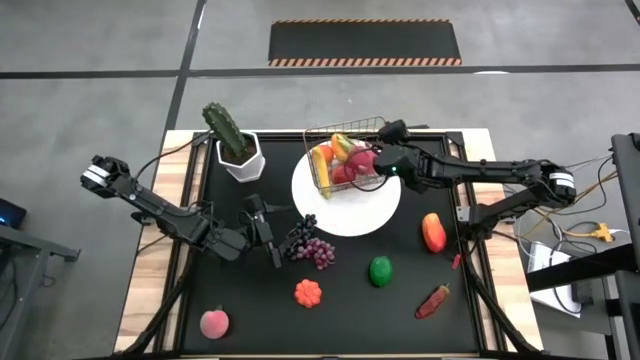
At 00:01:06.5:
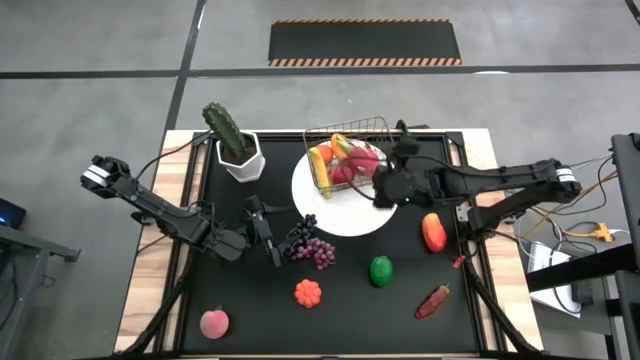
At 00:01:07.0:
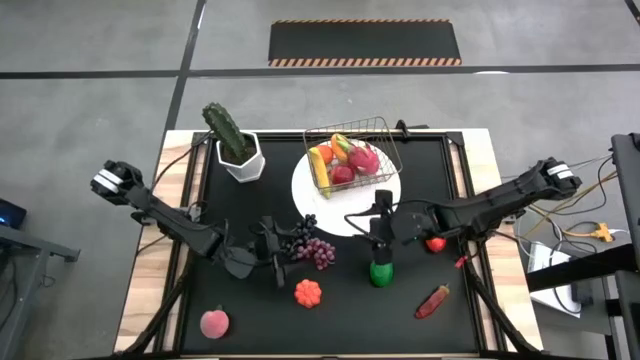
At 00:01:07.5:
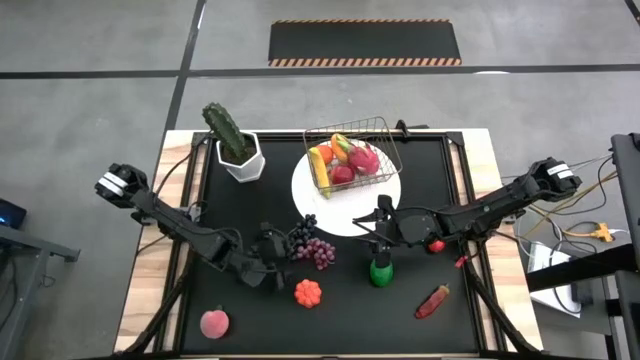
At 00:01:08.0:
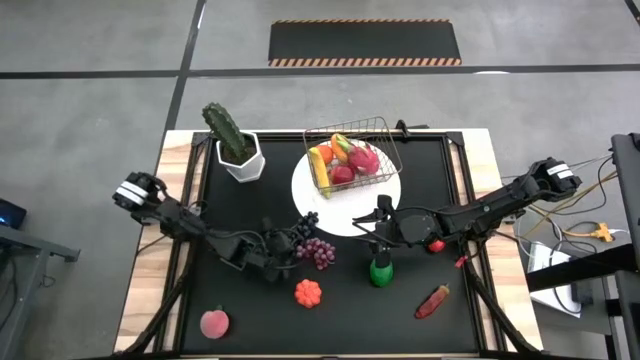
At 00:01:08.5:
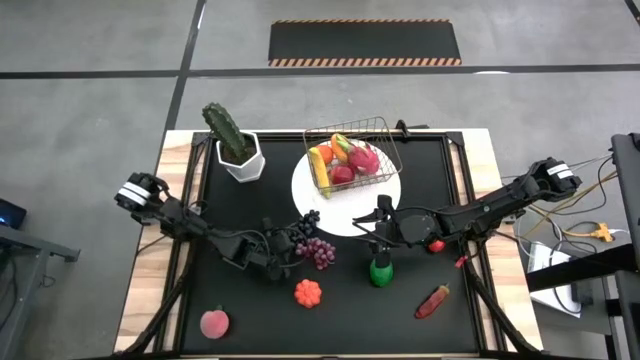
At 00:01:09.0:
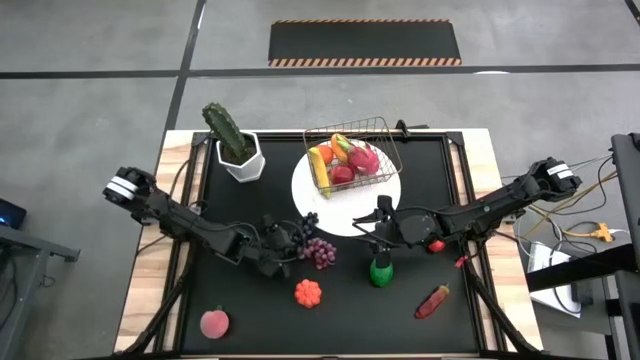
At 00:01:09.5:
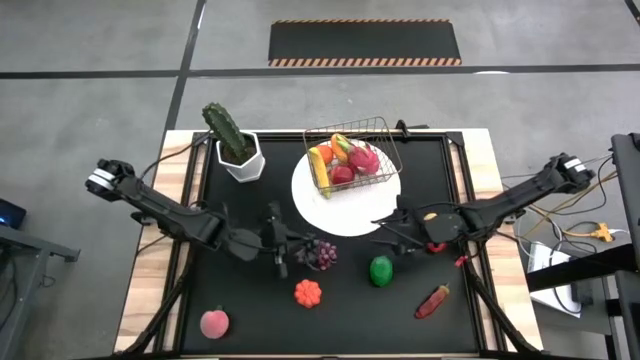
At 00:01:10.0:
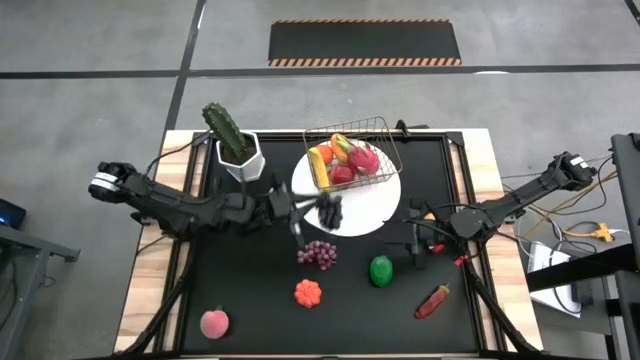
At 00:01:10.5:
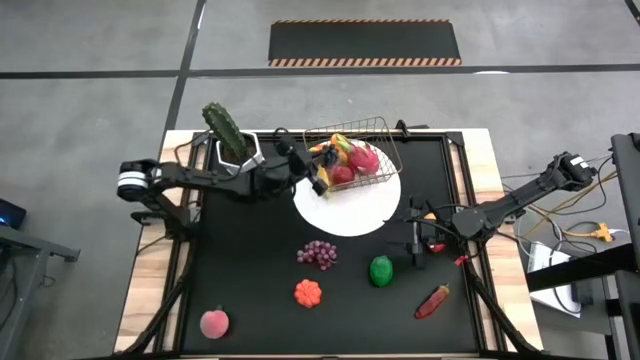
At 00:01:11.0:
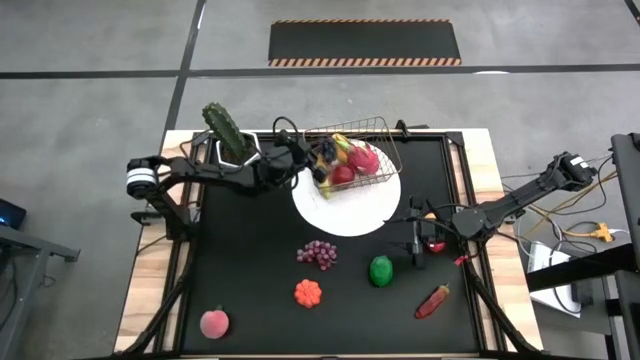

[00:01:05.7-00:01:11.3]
Task: Build produce basket
Put the black grapes into the wire basket

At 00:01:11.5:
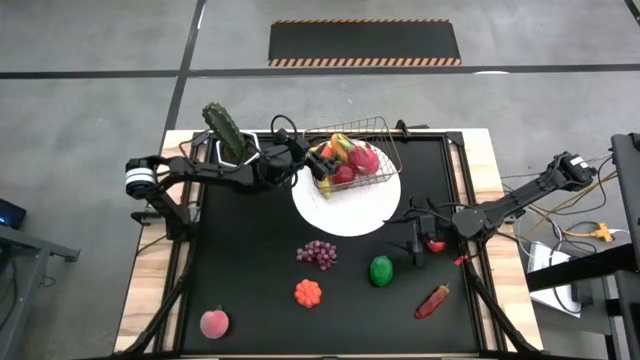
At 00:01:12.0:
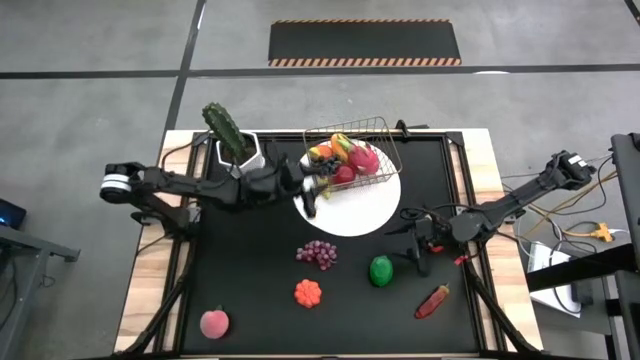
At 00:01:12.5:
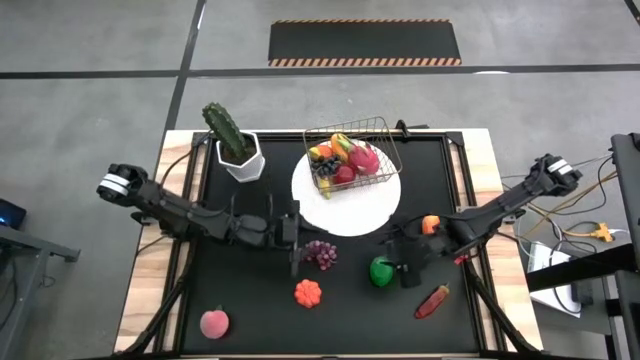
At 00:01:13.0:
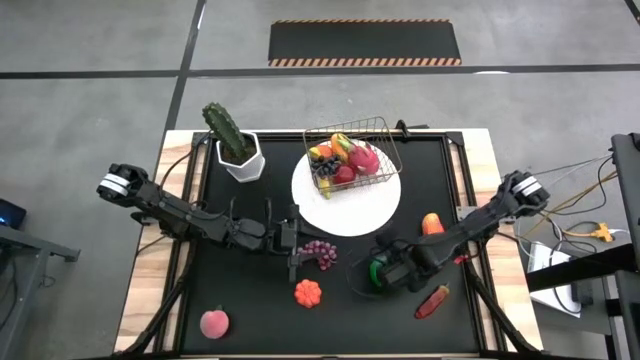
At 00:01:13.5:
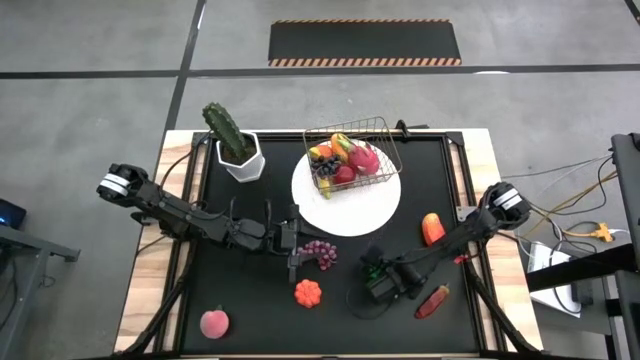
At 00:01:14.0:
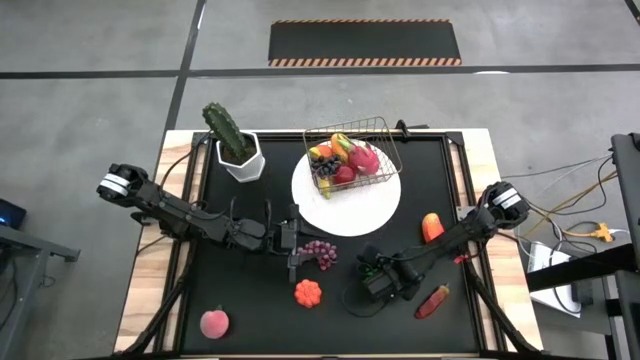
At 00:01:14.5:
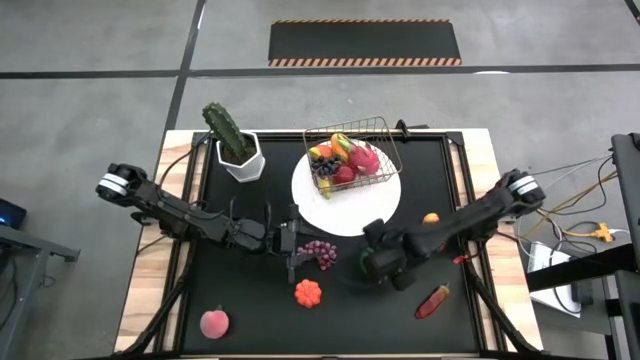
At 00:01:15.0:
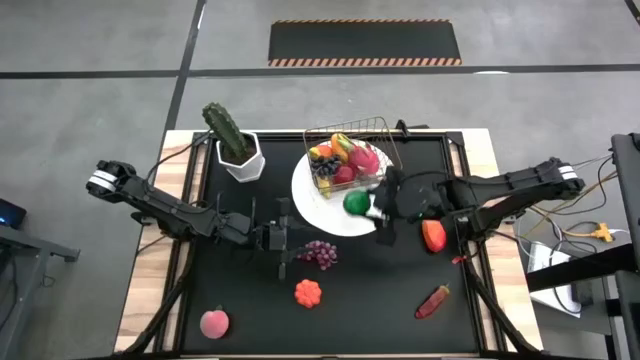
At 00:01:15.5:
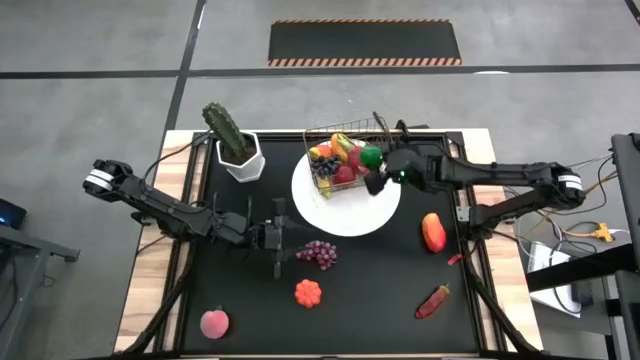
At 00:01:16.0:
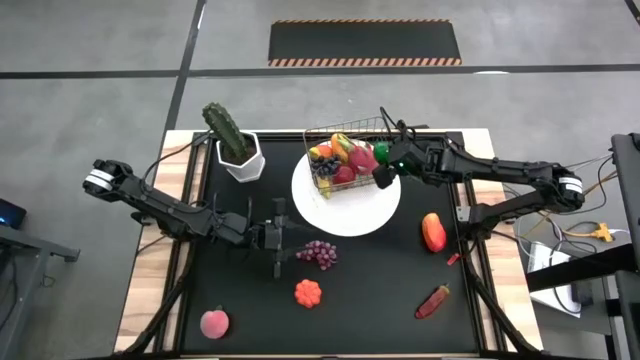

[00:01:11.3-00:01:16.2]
Put the green lime into the wire basket

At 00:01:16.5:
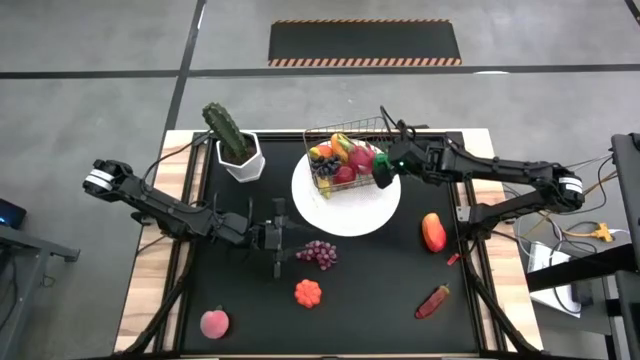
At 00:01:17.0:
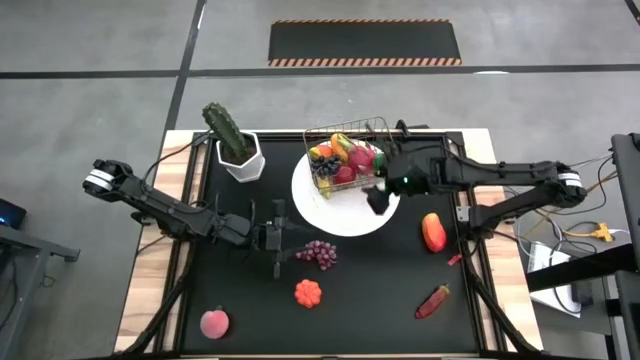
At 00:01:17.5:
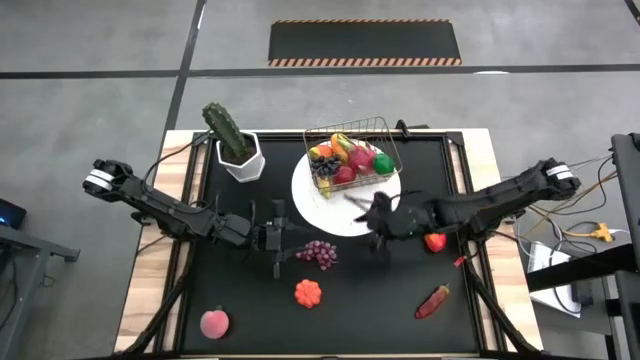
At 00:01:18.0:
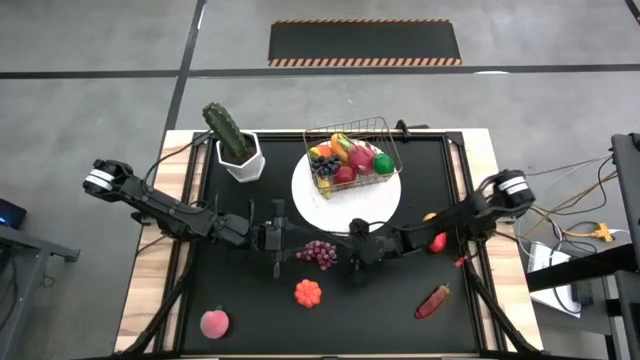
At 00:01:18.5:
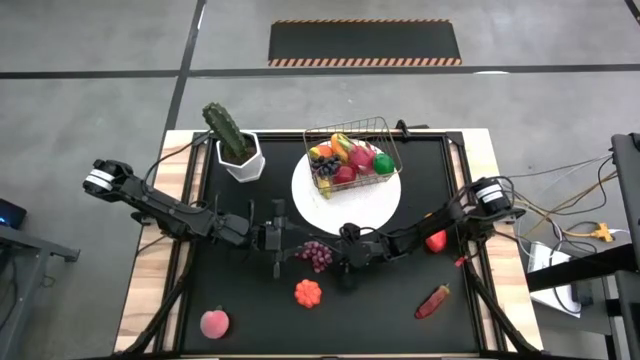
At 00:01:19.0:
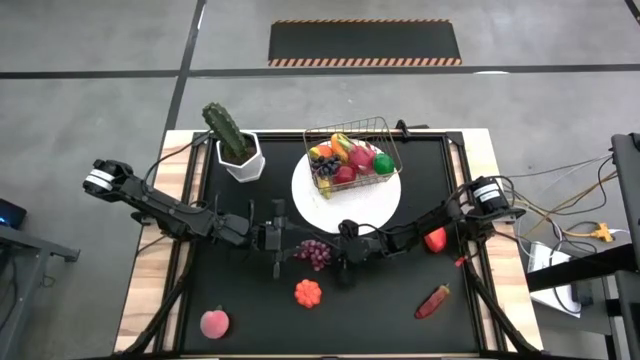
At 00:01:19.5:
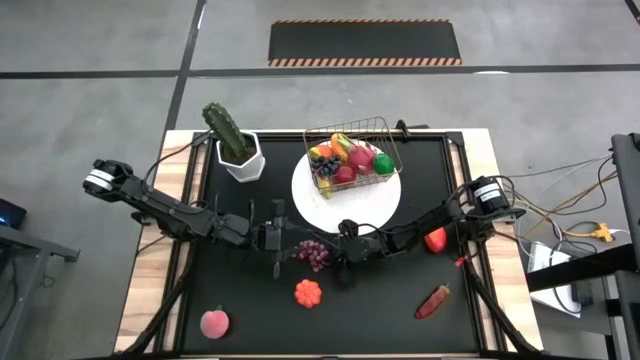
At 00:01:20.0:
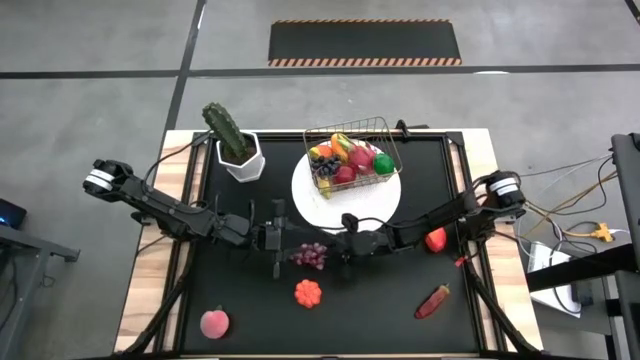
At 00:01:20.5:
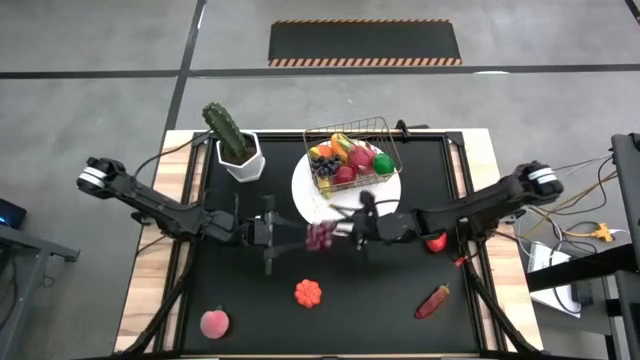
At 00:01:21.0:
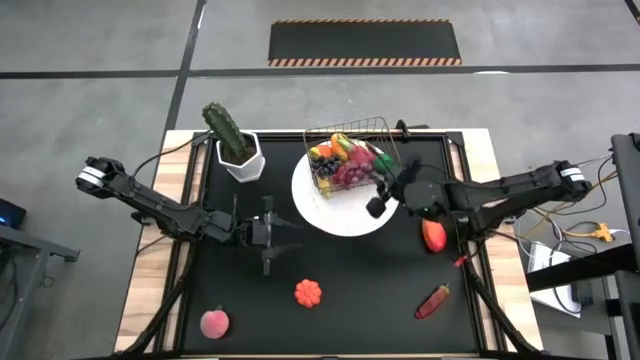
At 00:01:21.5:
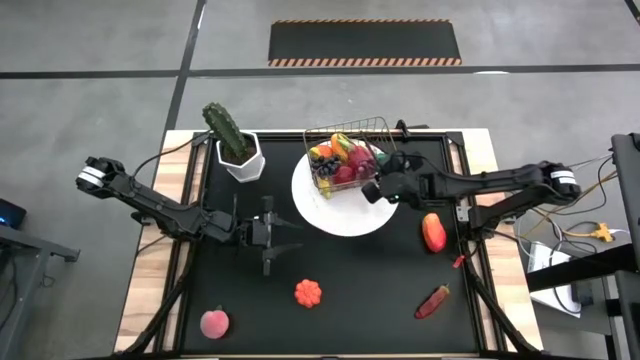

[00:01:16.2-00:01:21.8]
Put the red grapes into the wire basket

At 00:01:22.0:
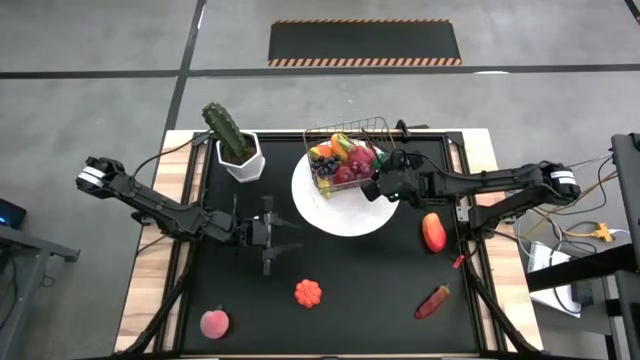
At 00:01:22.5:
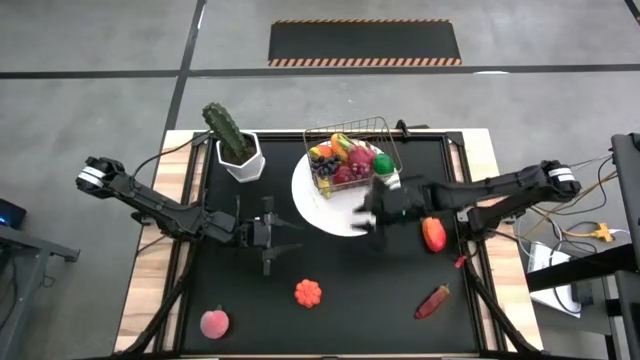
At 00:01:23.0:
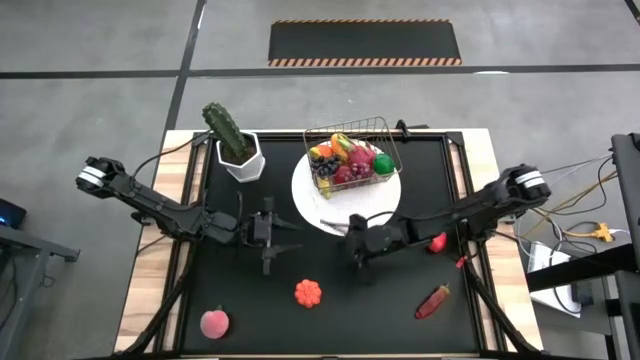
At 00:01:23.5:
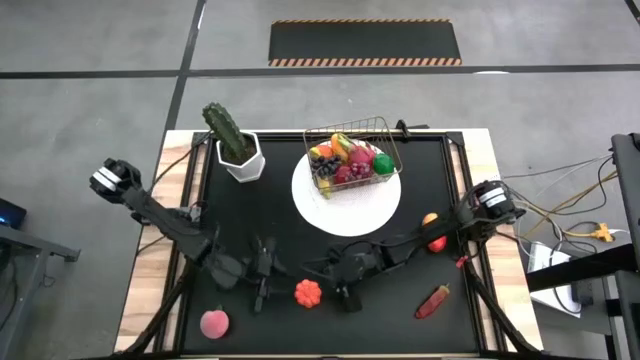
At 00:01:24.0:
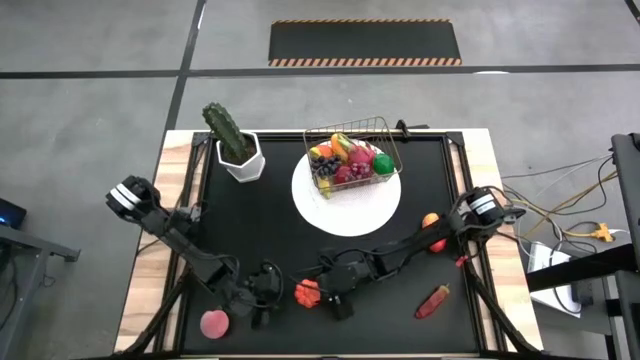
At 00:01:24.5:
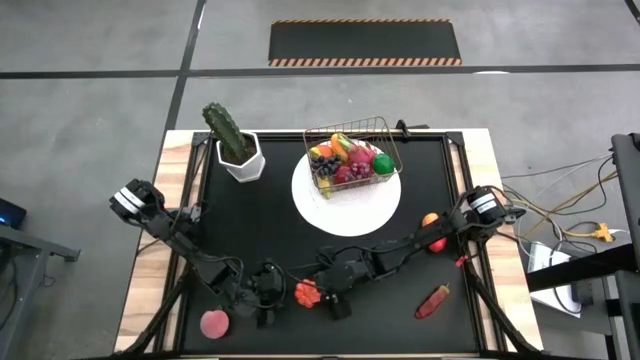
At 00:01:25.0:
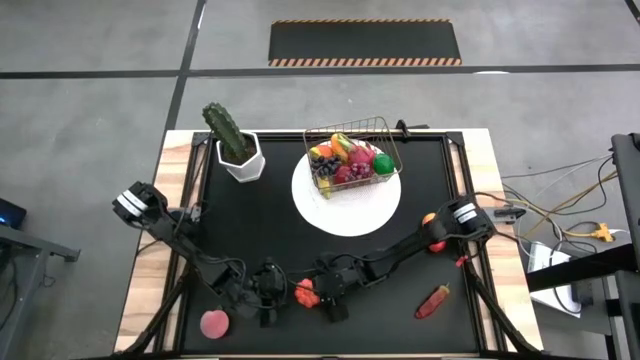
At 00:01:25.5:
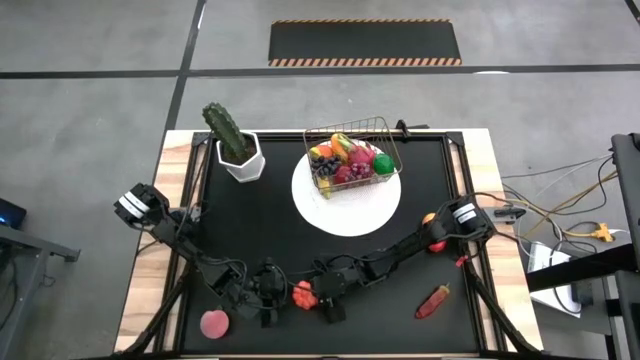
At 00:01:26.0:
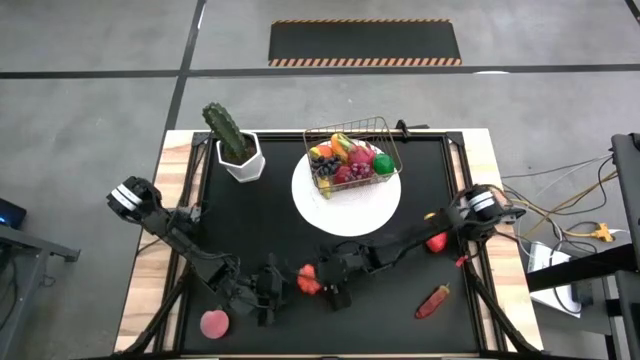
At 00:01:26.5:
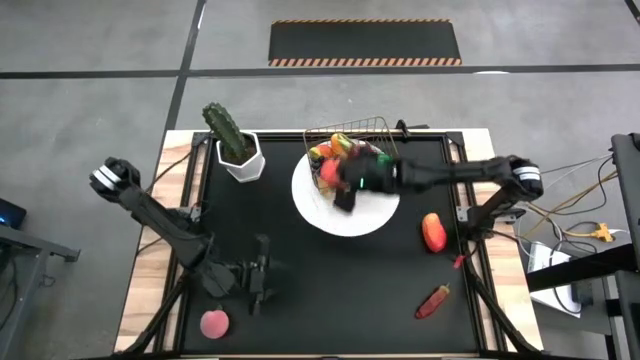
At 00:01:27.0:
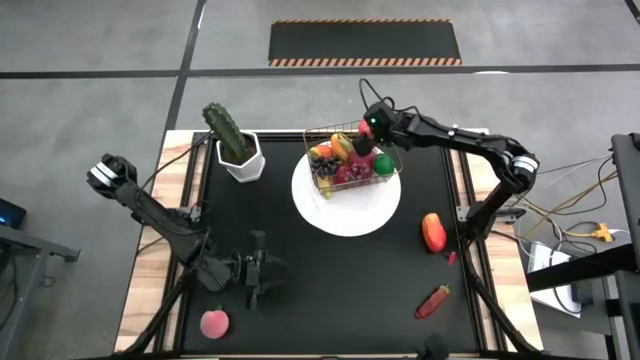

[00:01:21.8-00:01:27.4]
Put the orange pumpkin into the wire basket
